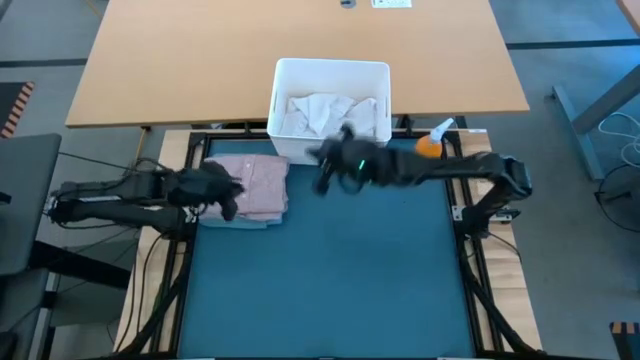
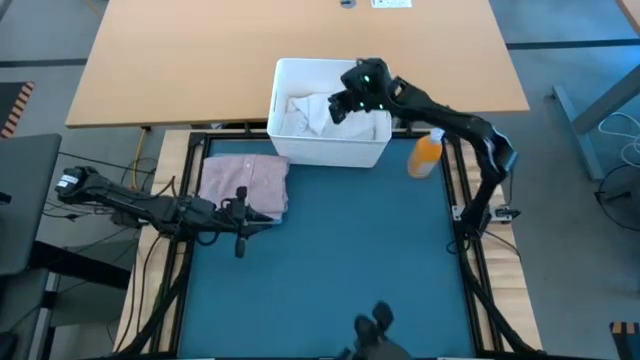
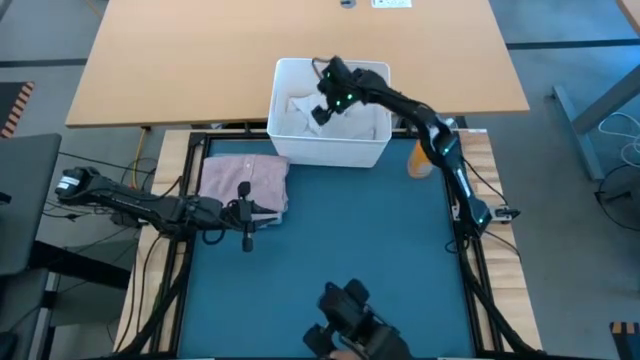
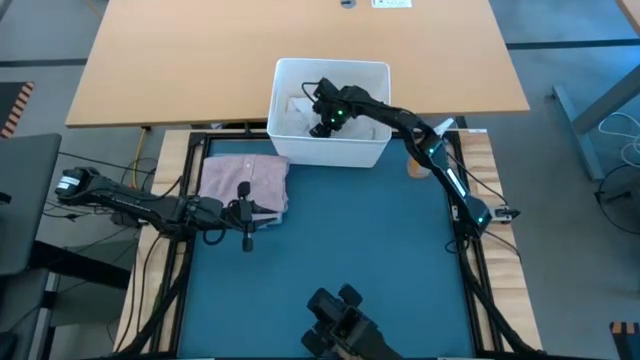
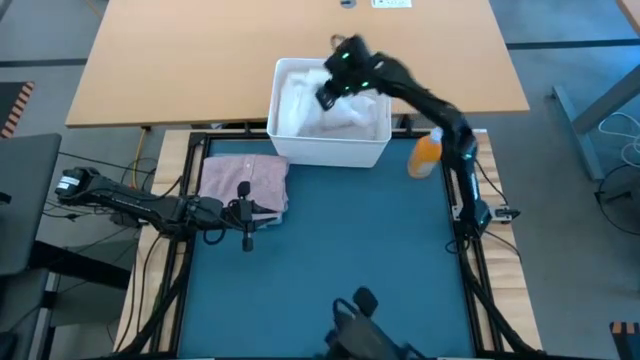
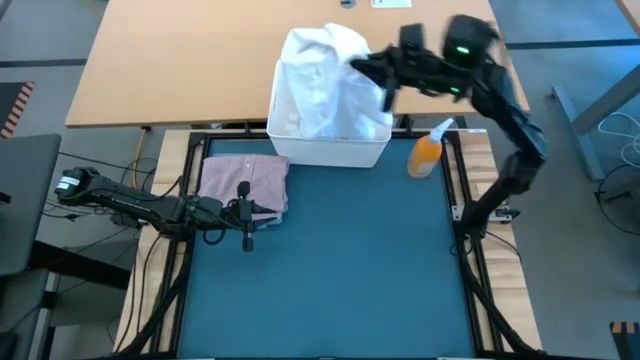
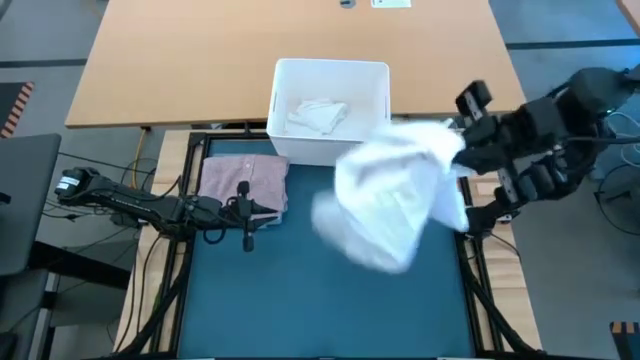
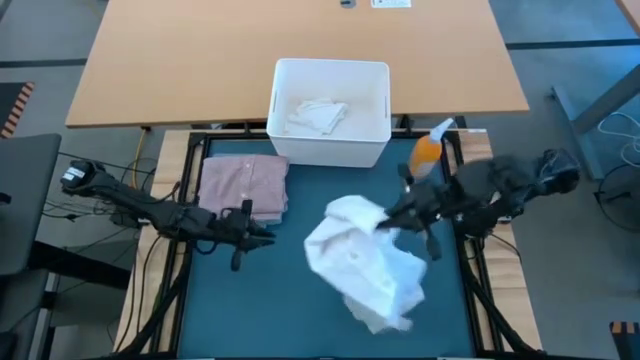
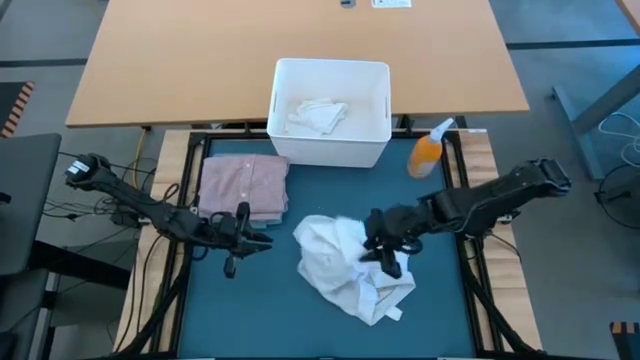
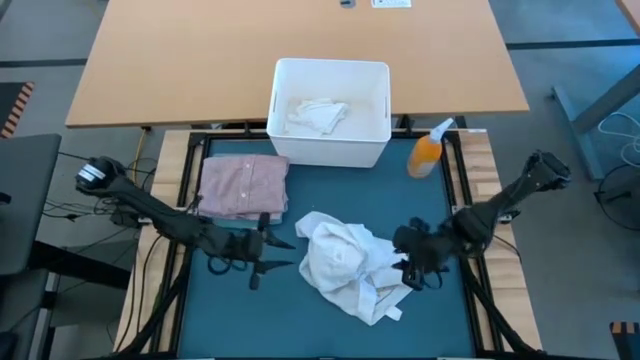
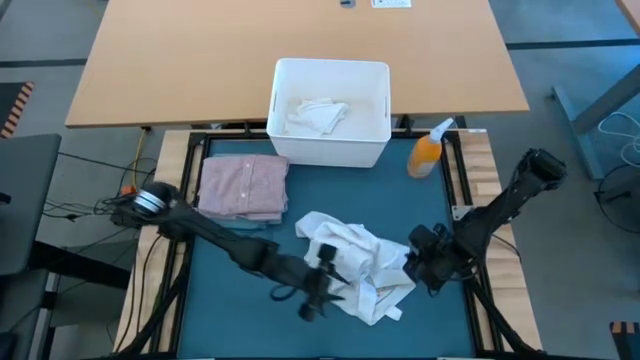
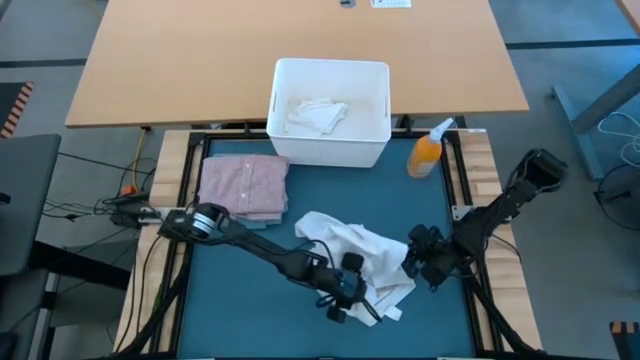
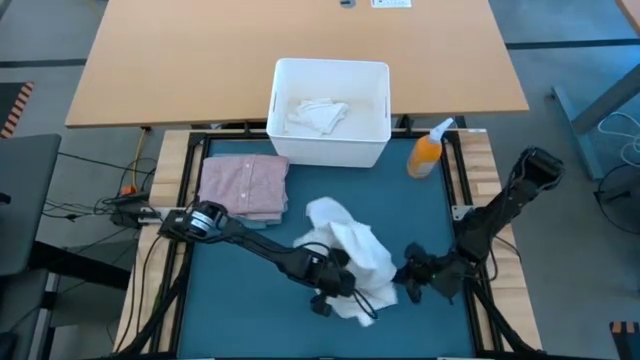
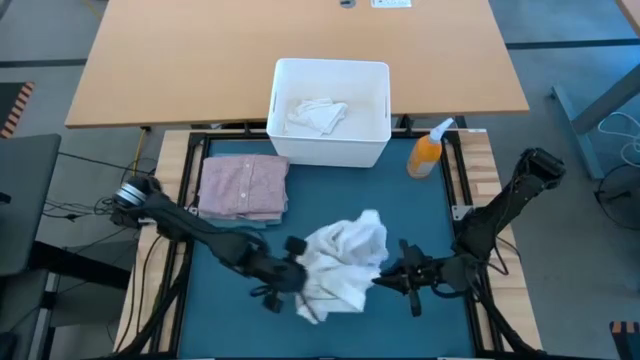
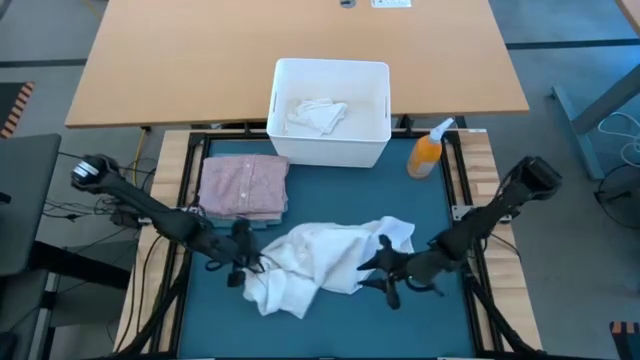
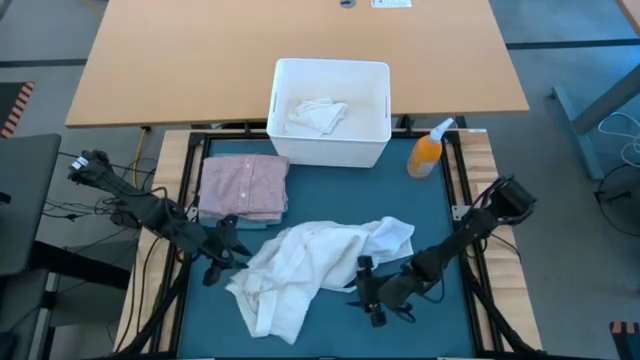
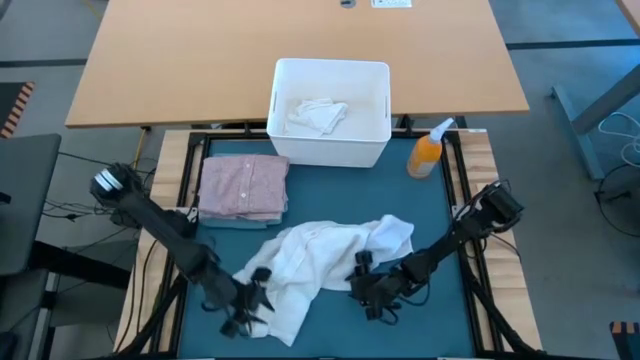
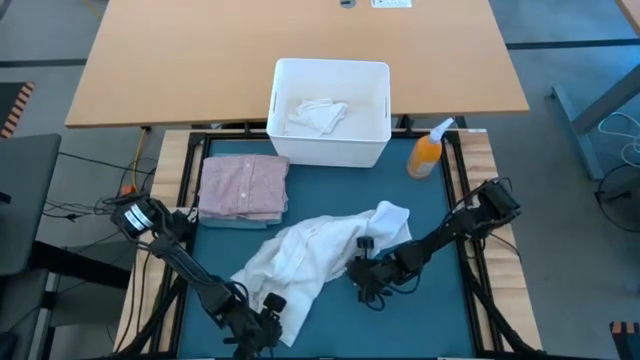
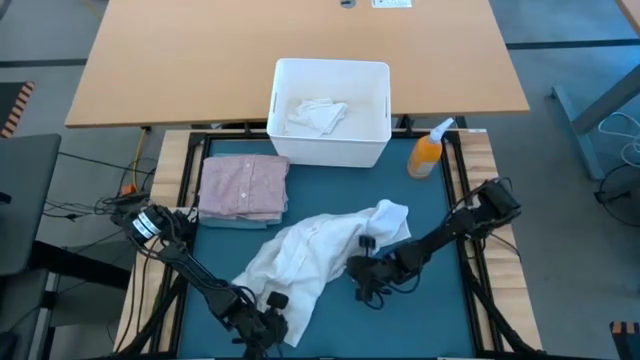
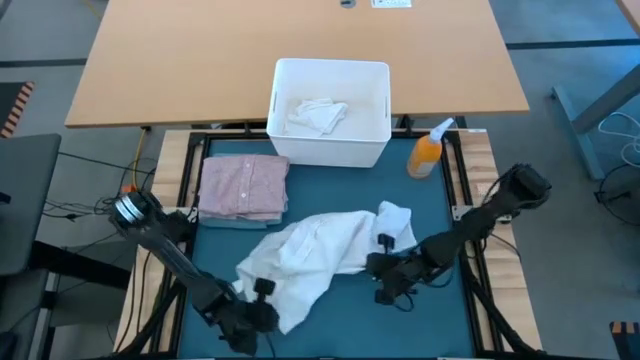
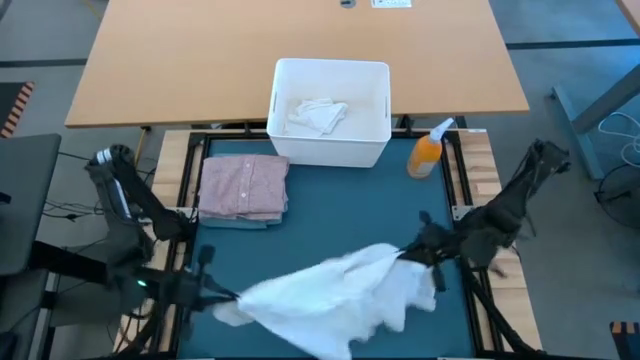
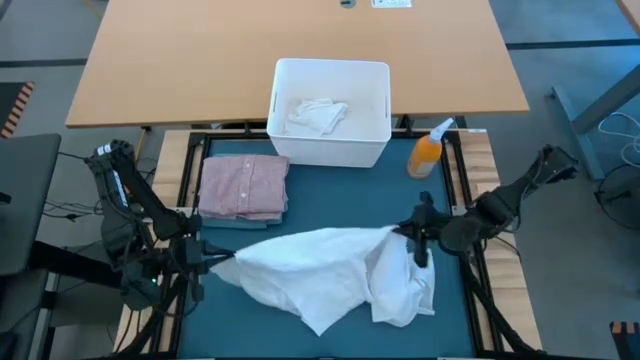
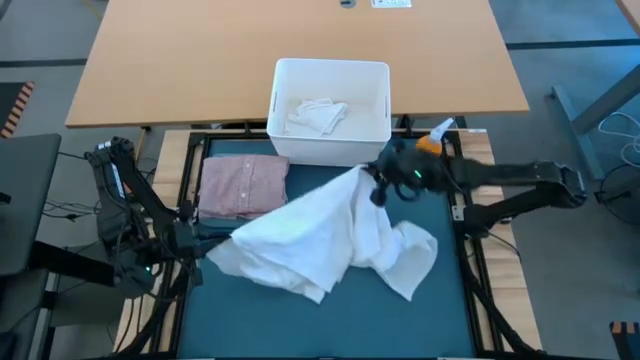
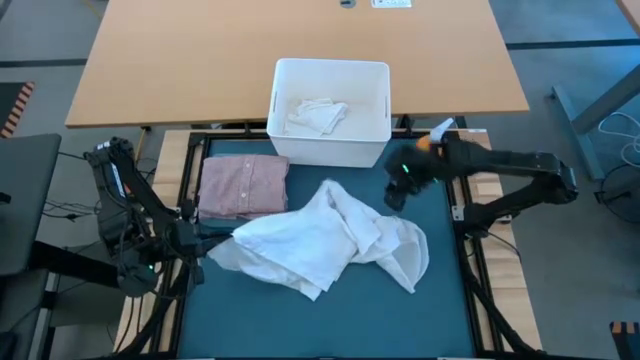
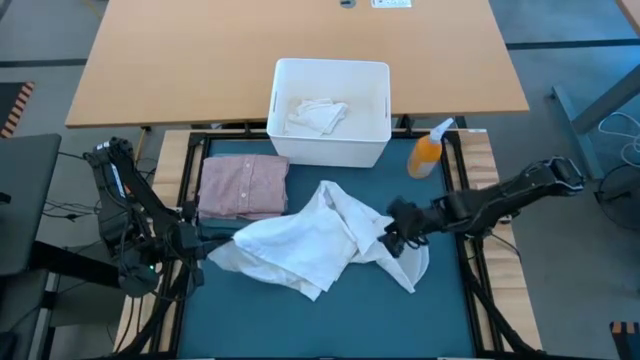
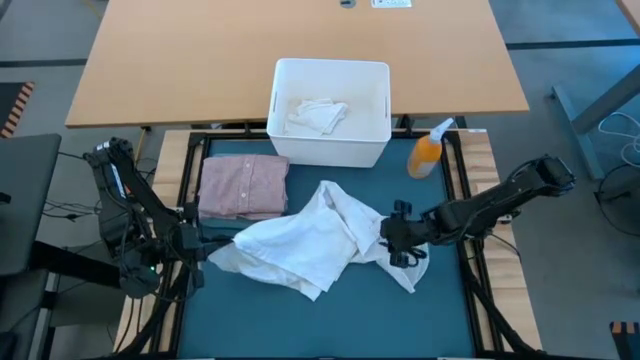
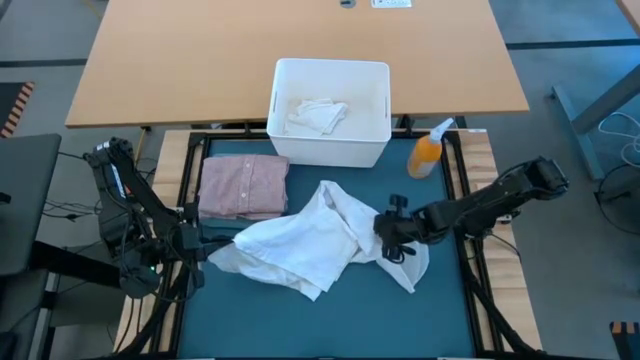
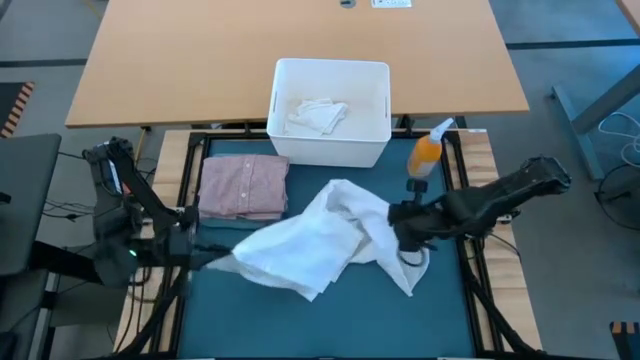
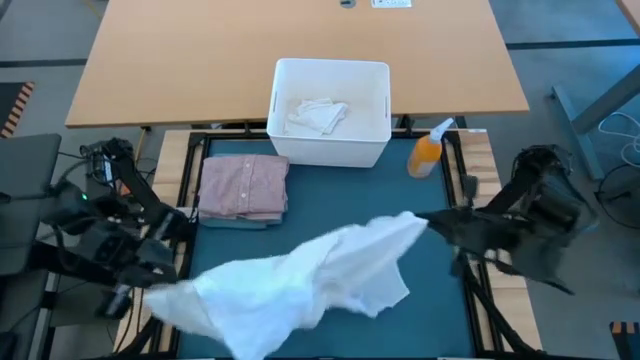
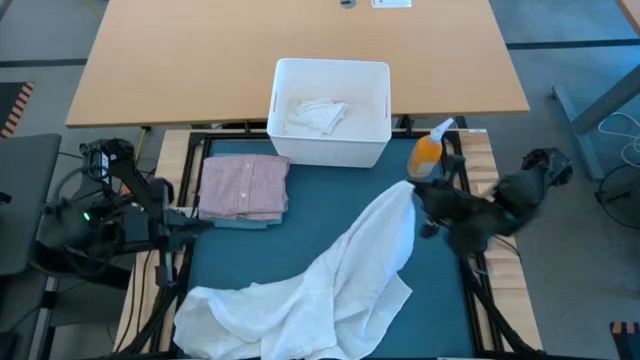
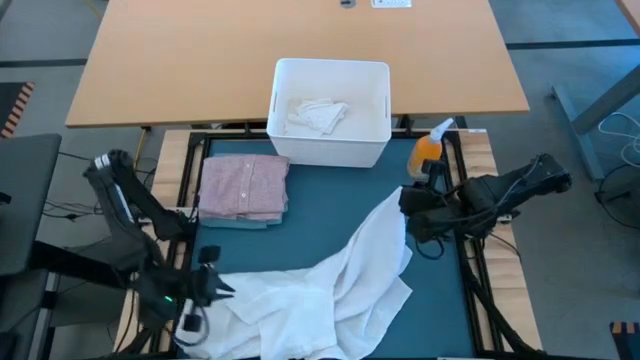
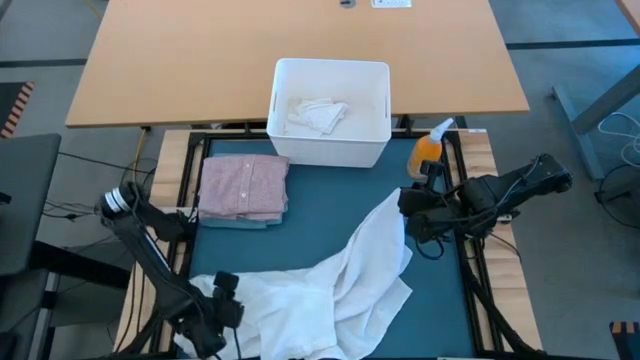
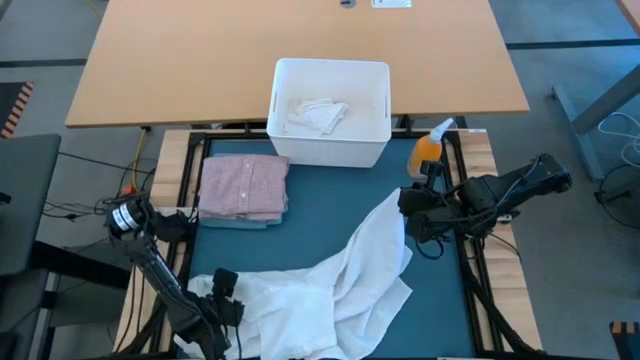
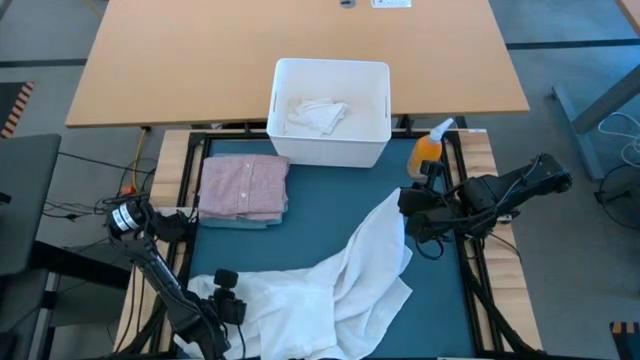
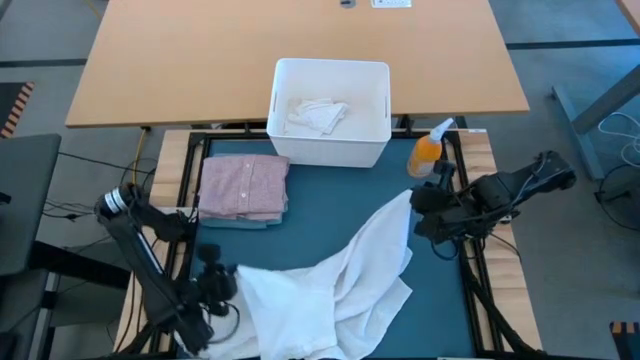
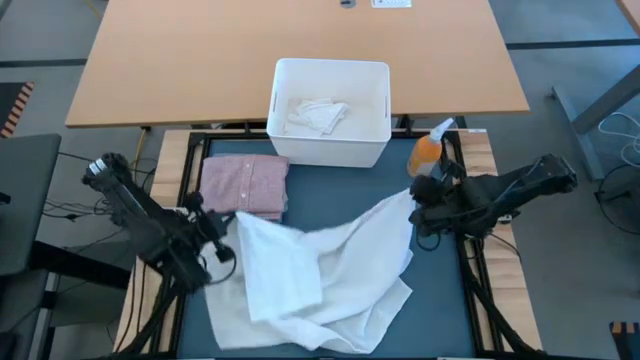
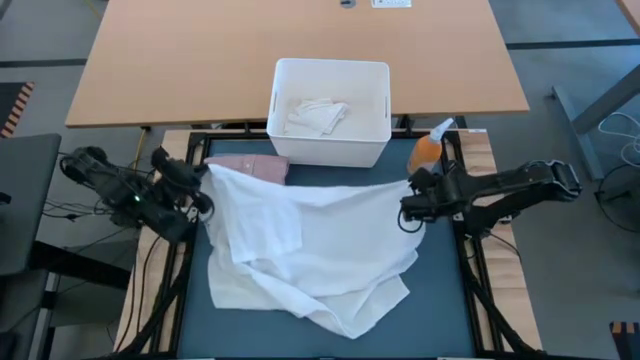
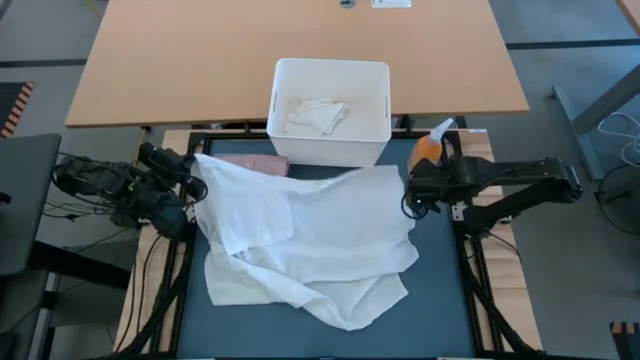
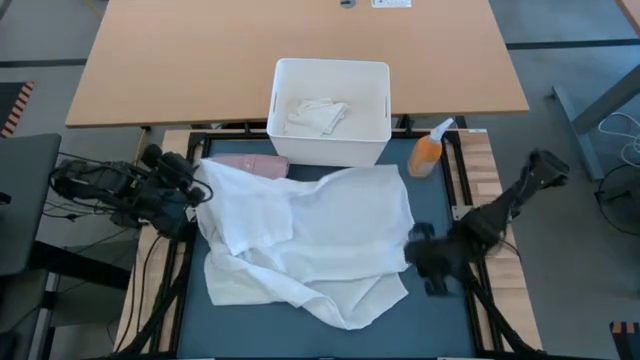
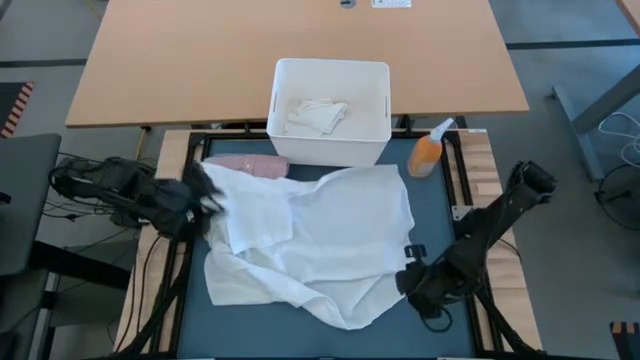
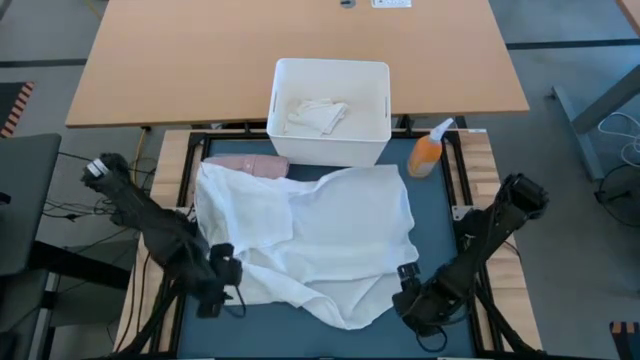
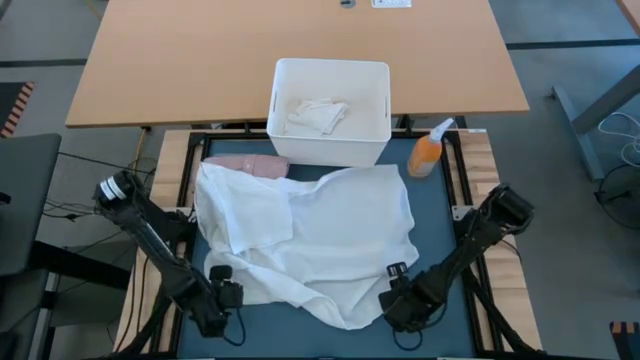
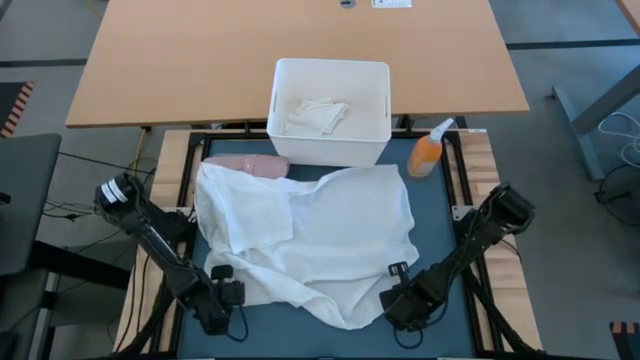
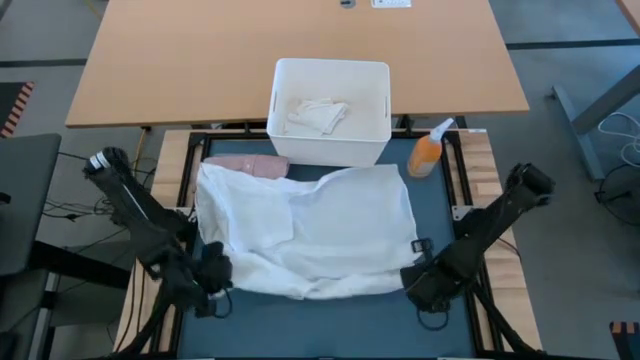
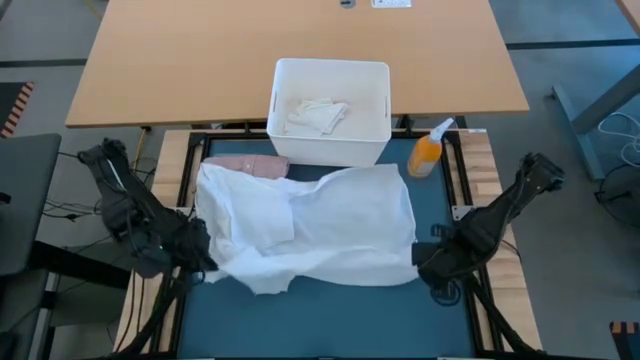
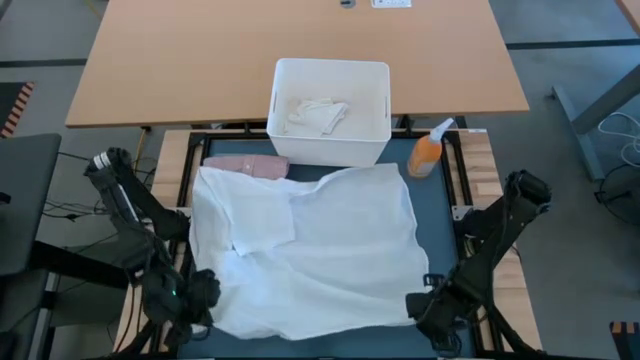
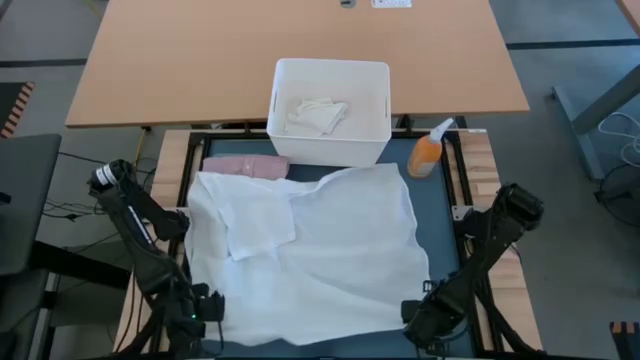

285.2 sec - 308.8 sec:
Task: Fold Laundry from Bin
Fold the white shirt
